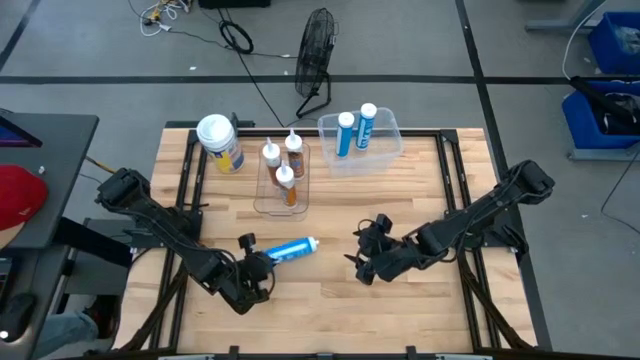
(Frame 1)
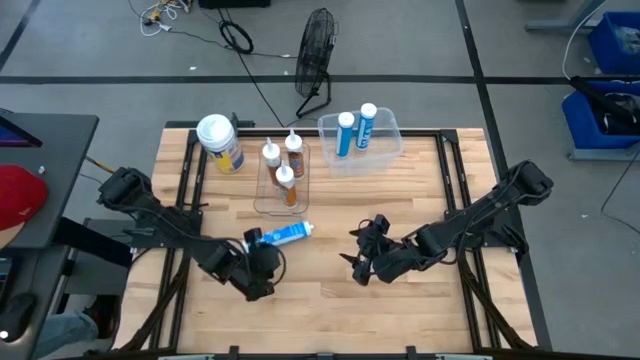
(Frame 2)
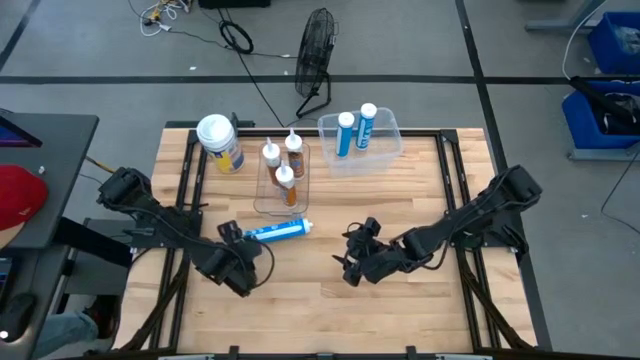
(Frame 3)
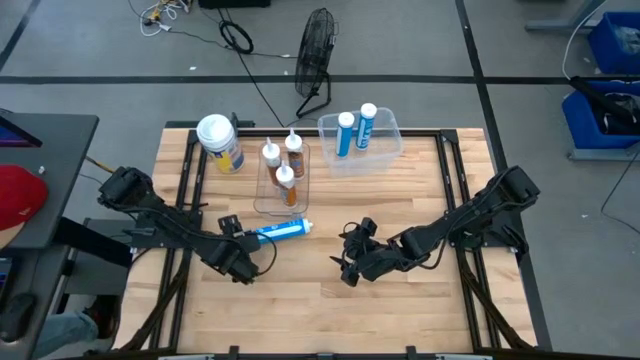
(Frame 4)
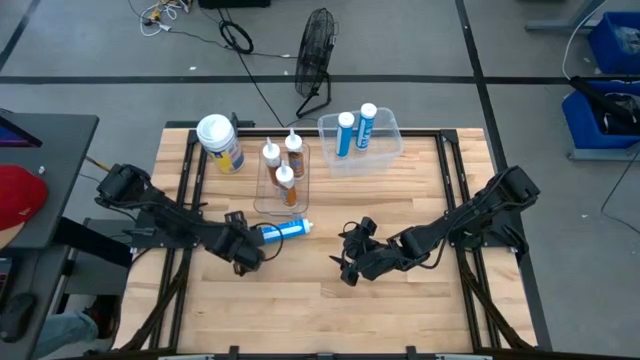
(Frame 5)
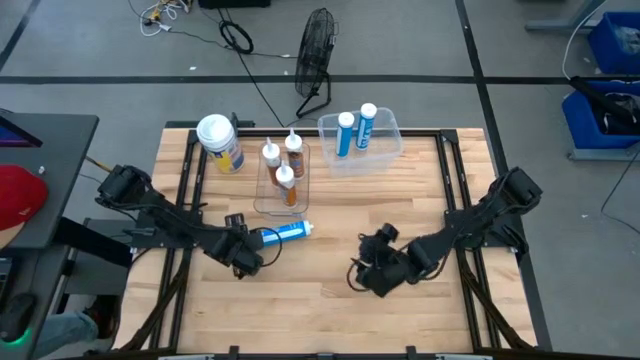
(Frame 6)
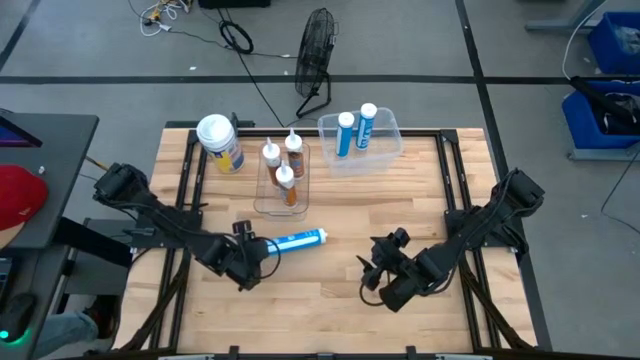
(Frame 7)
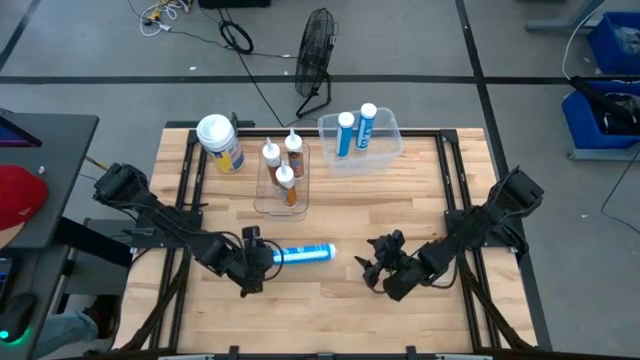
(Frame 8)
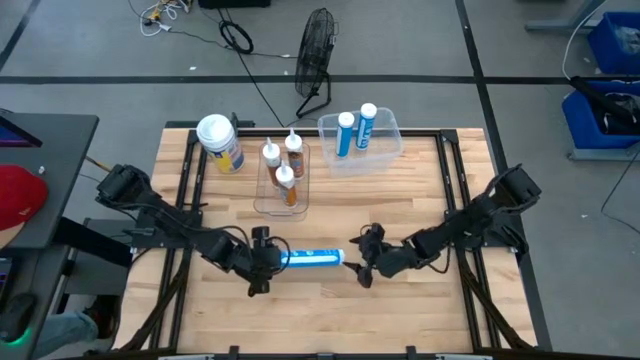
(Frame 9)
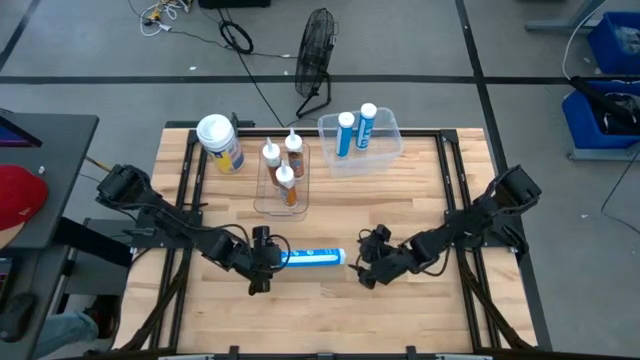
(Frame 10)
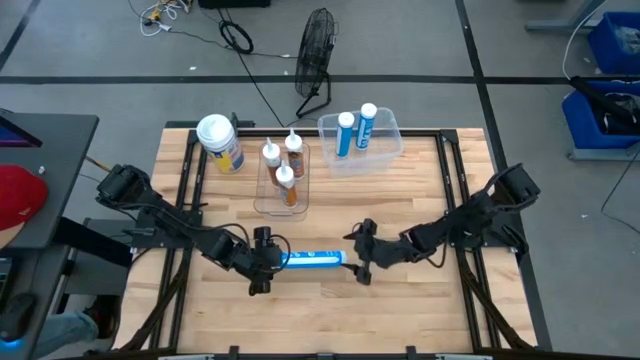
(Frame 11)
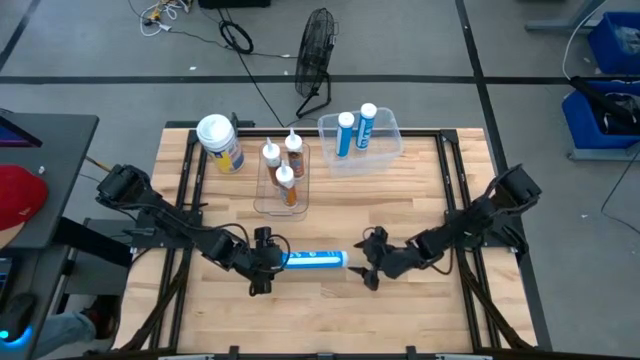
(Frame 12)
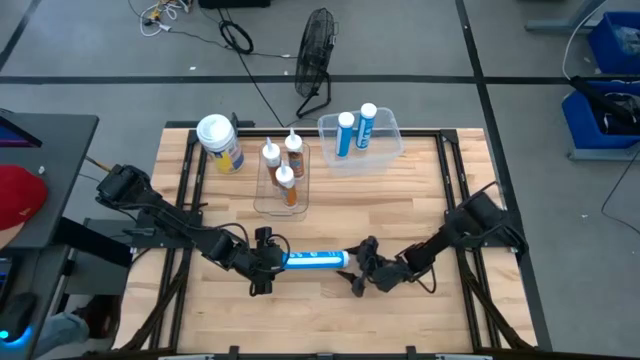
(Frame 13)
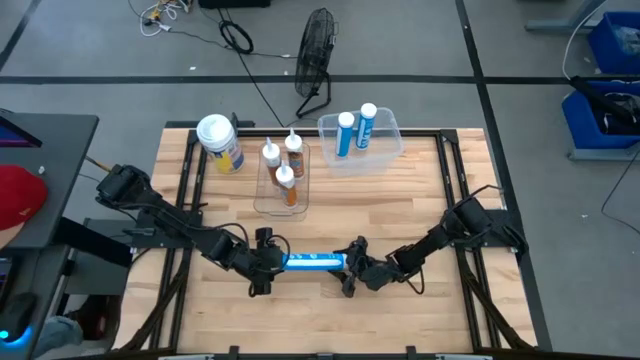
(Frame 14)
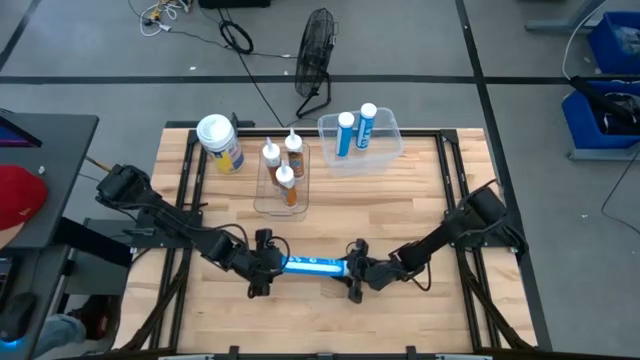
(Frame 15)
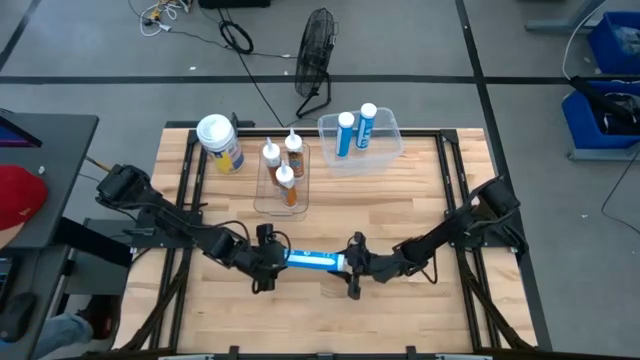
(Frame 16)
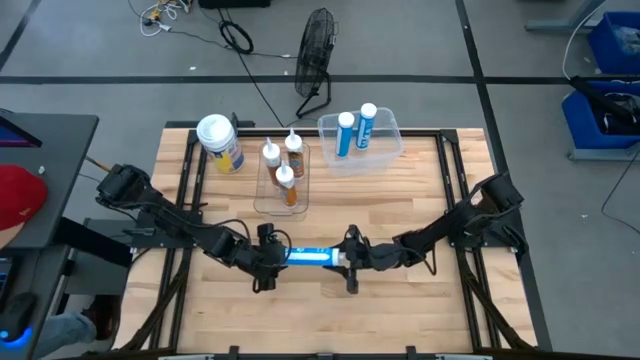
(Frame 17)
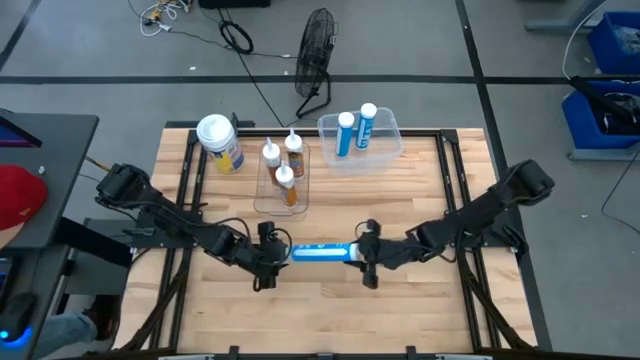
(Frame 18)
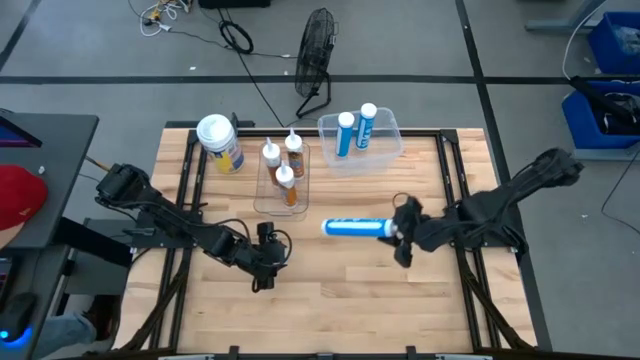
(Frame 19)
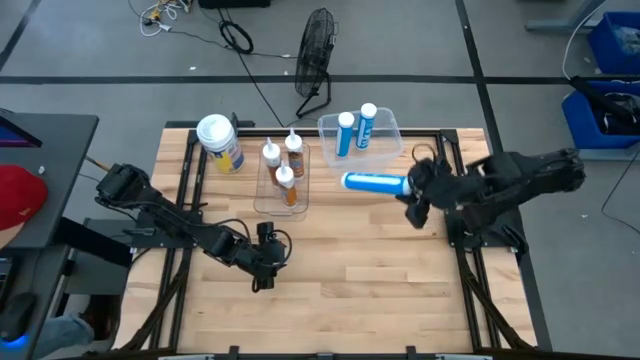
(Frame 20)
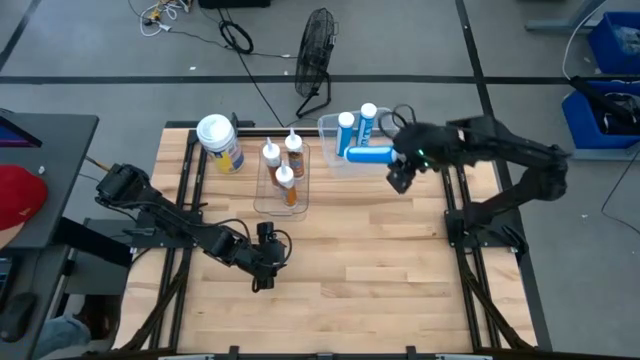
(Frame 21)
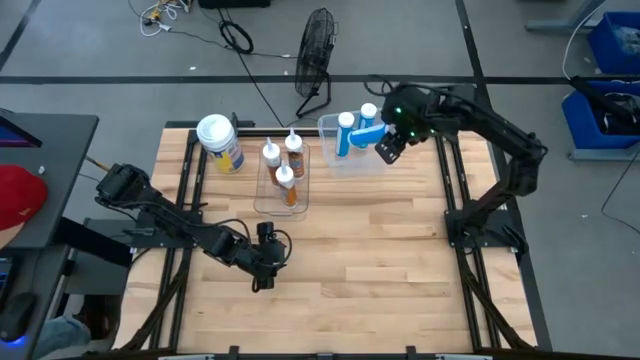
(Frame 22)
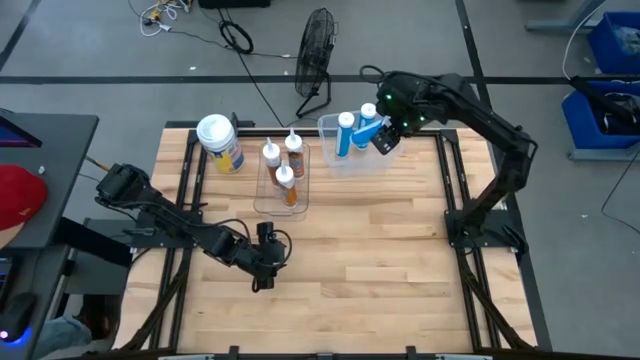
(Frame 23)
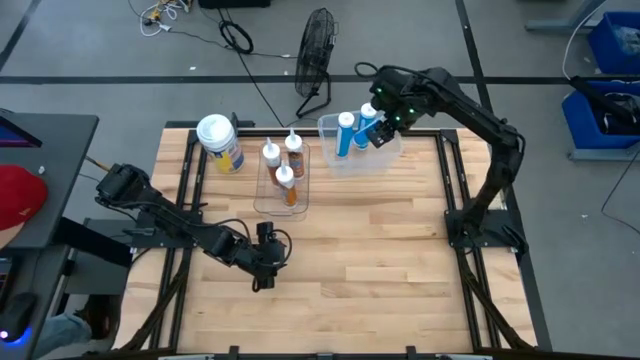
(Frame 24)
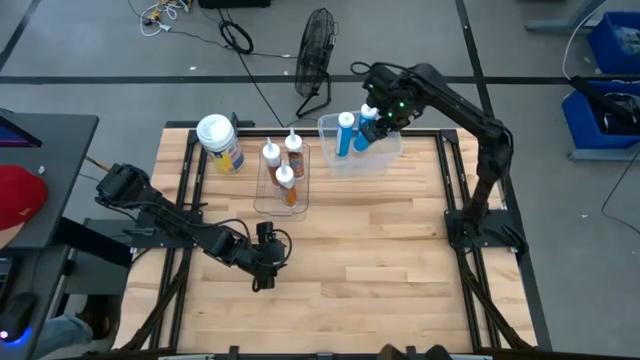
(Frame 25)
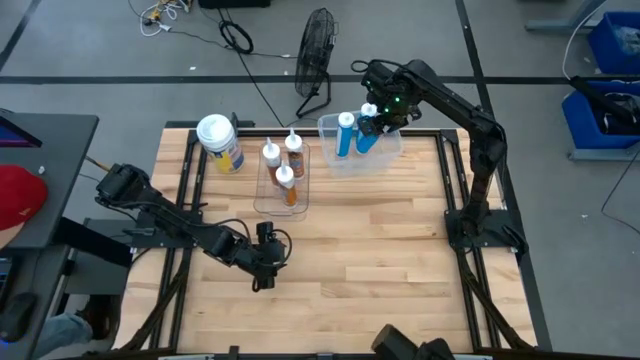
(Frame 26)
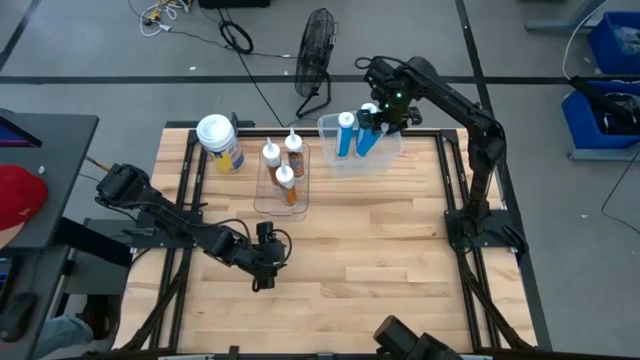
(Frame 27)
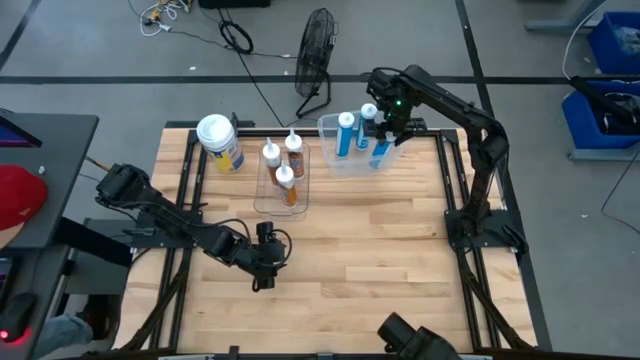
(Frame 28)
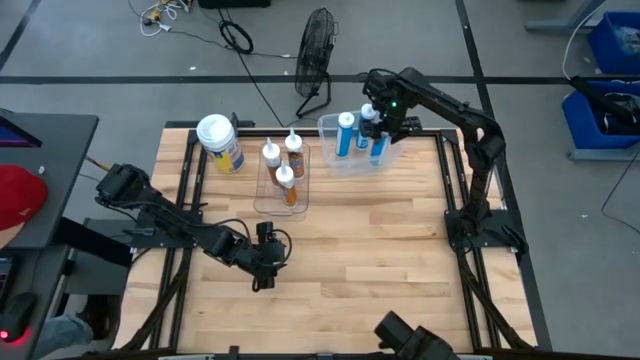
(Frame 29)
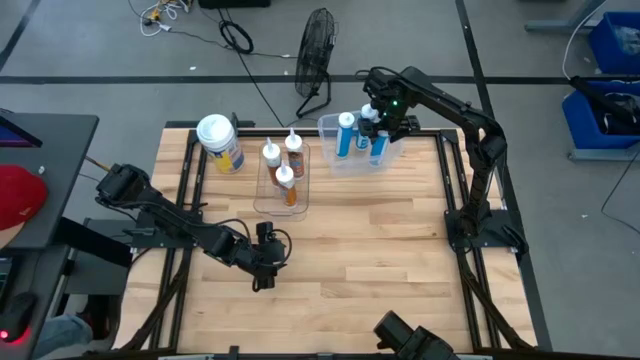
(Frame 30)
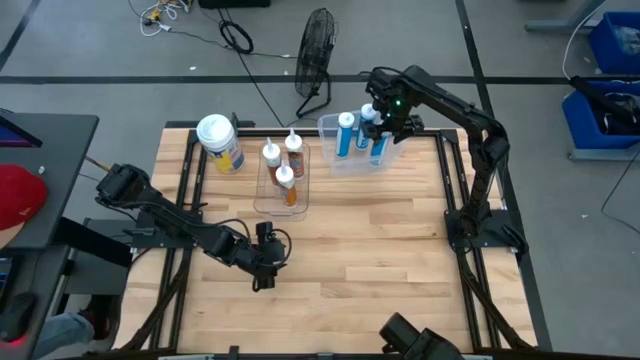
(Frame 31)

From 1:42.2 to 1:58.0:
Task: Pick & place silicon tubes, Sealant and Lysol wipes
Put the blue sealant into the white bin

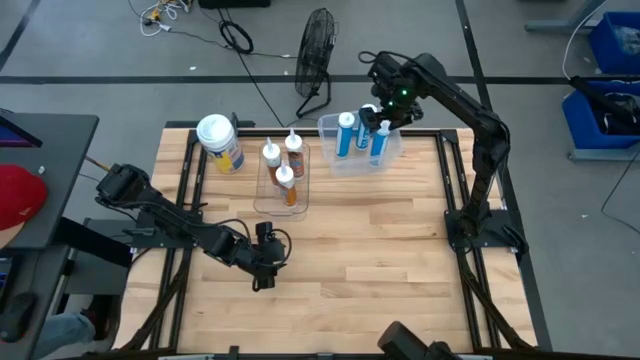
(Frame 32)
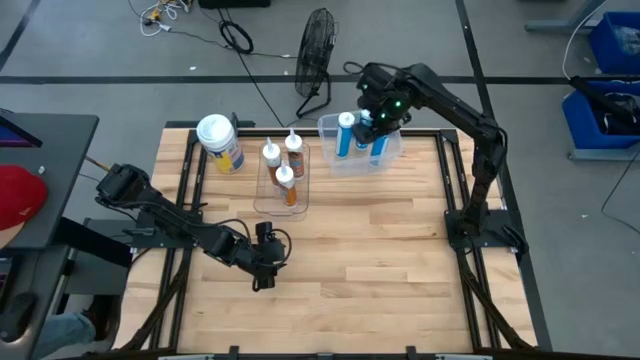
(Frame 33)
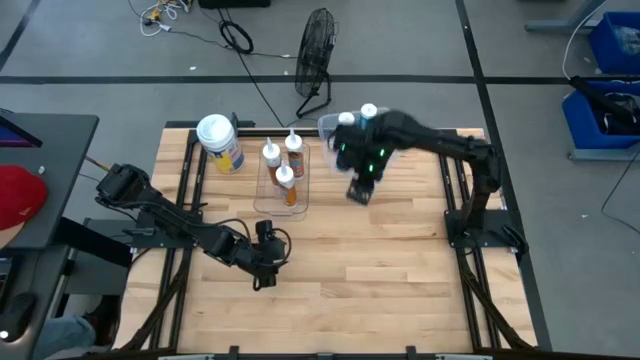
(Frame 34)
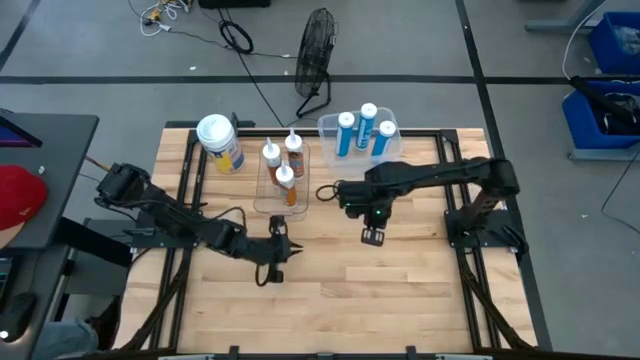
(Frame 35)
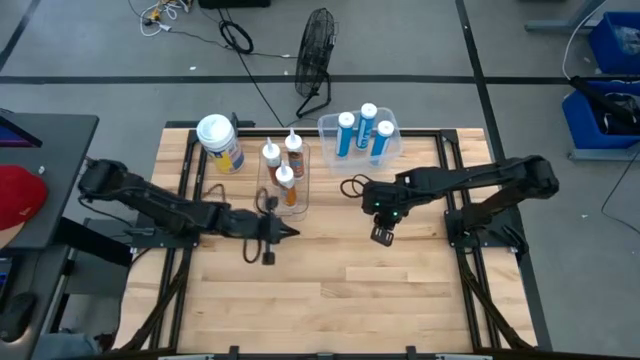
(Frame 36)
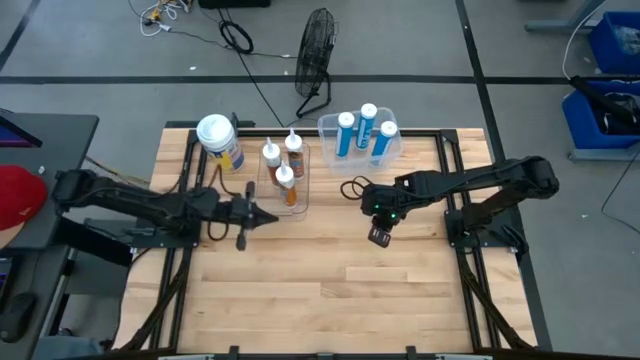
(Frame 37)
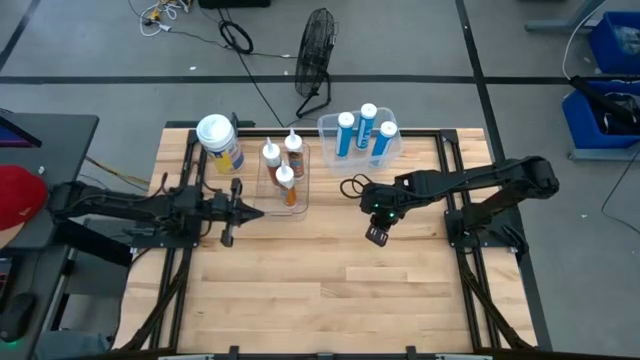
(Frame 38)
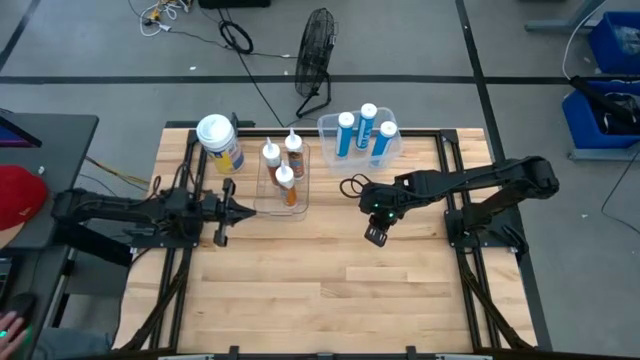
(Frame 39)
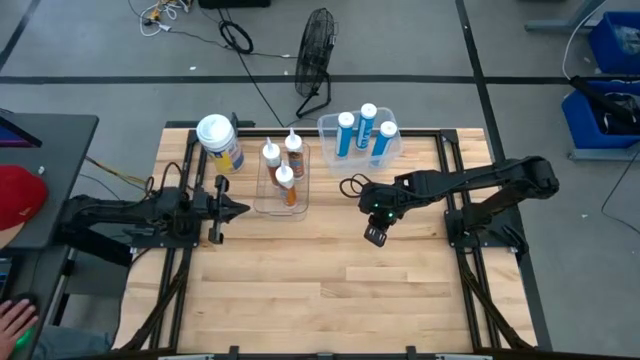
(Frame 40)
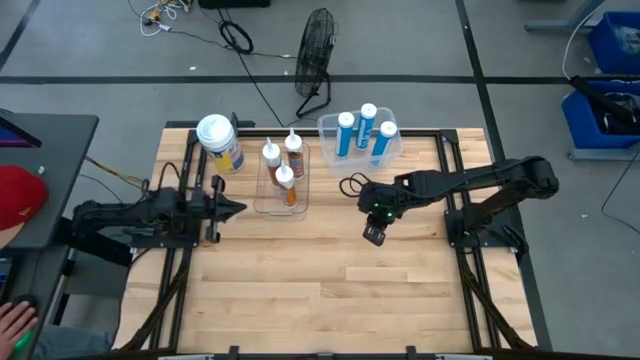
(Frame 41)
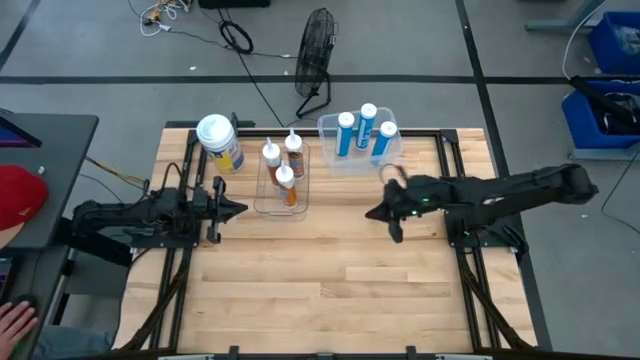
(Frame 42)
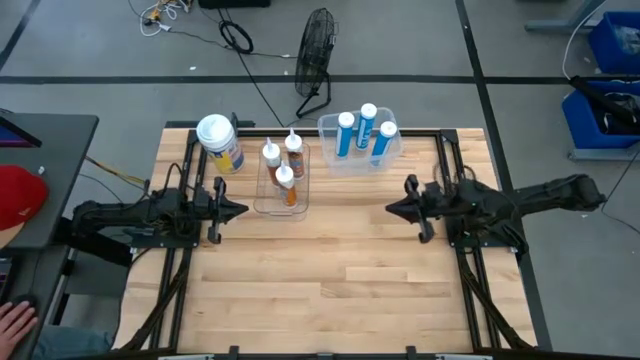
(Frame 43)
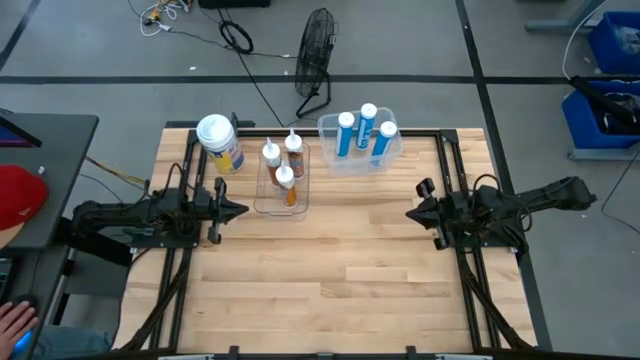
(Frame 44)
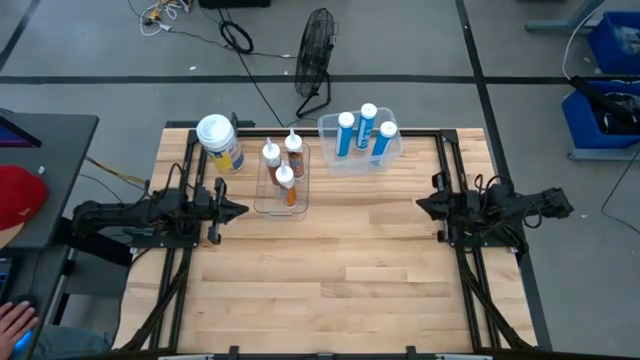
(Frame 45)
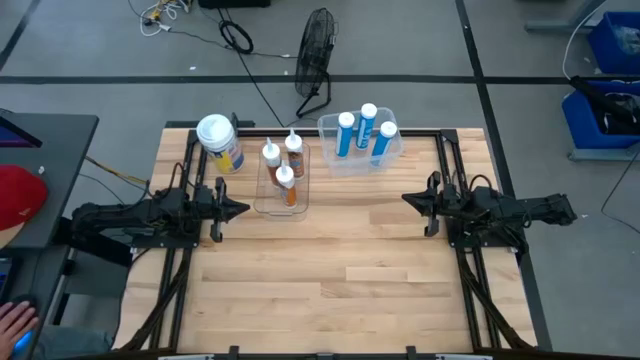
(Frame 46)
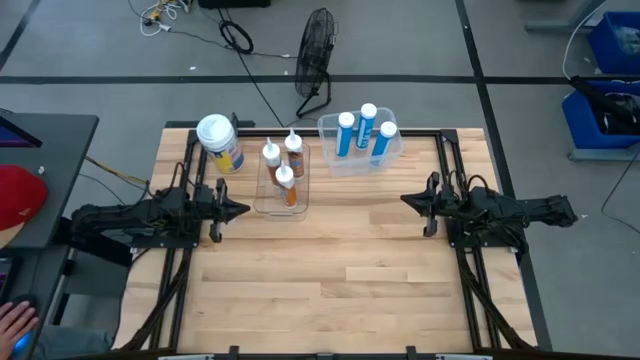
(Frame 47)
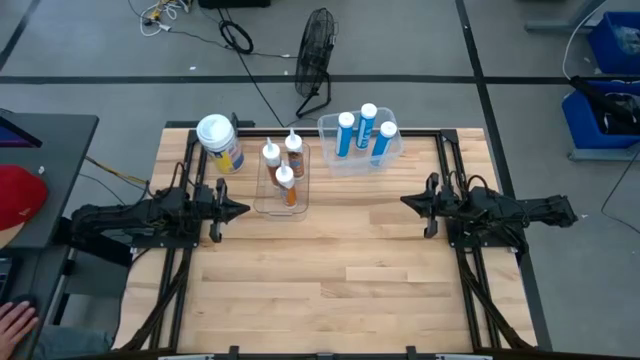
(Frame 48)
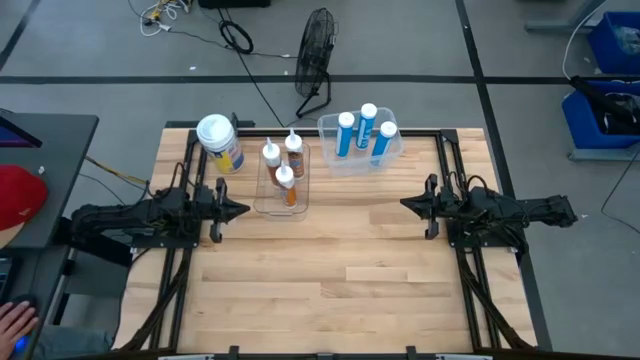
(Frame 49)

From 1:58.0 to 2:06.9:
Return to Home Position
